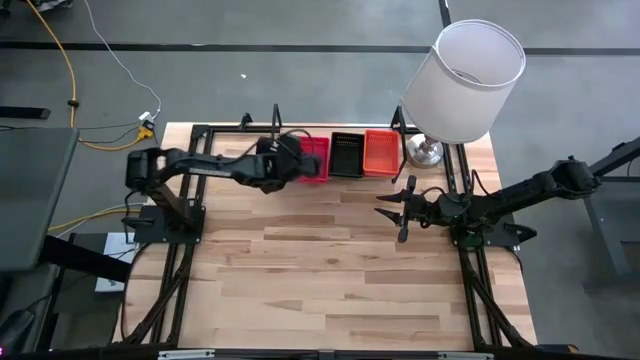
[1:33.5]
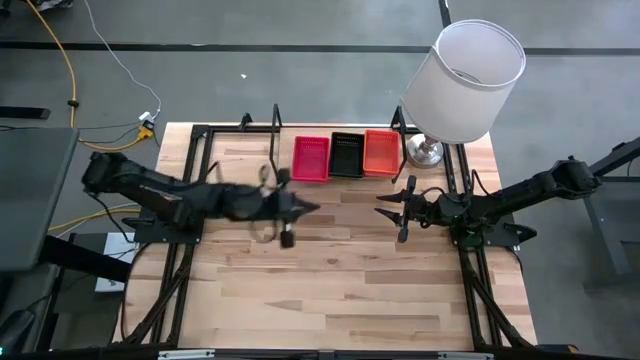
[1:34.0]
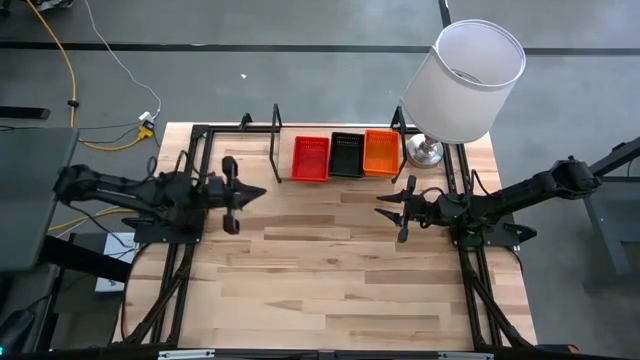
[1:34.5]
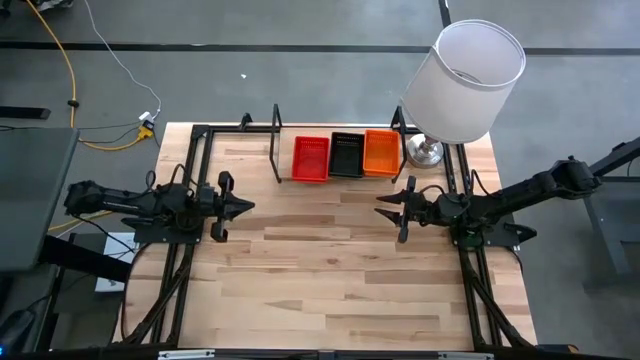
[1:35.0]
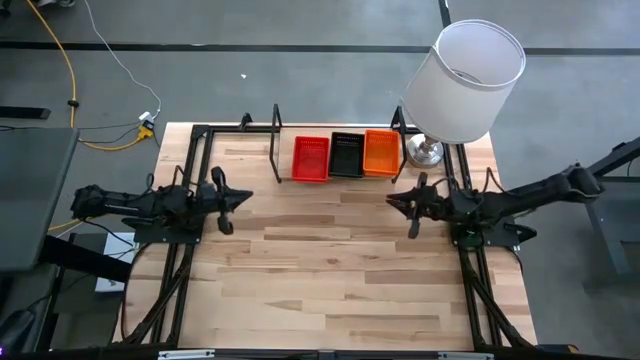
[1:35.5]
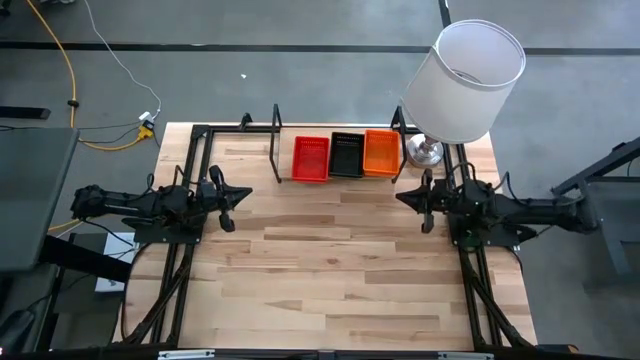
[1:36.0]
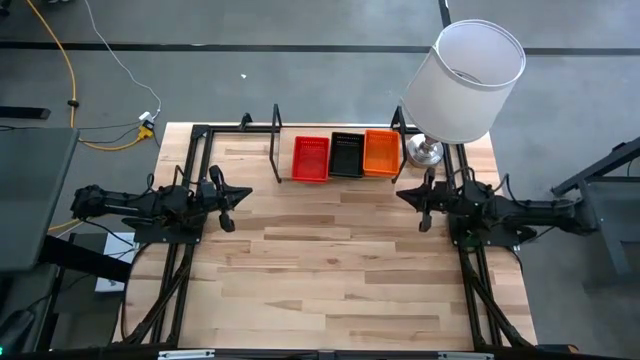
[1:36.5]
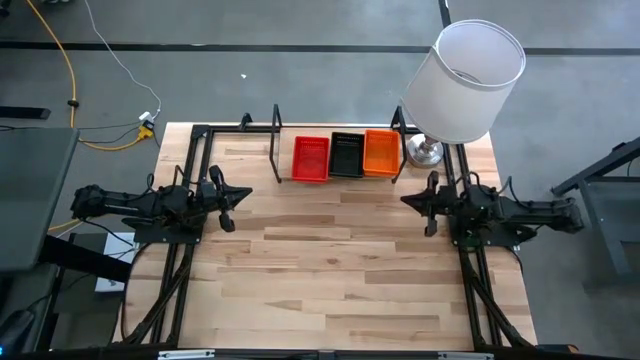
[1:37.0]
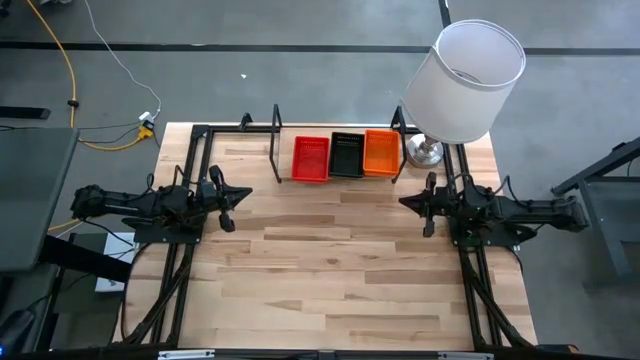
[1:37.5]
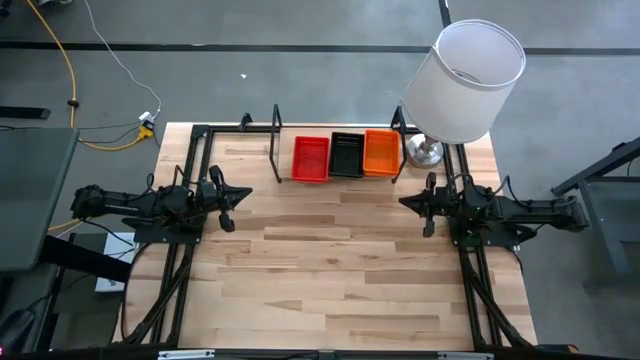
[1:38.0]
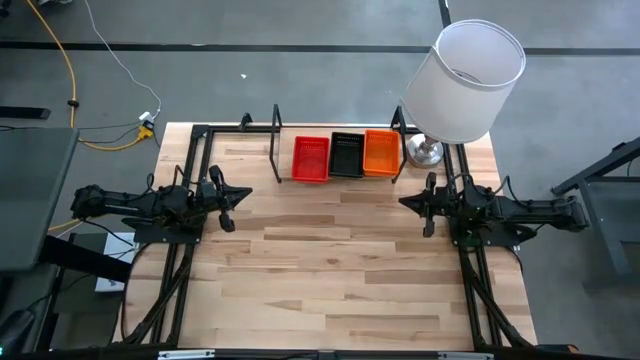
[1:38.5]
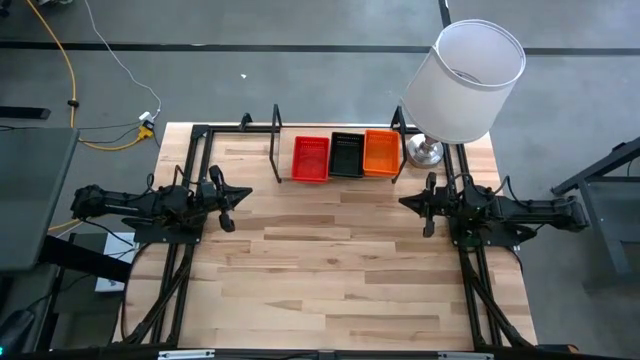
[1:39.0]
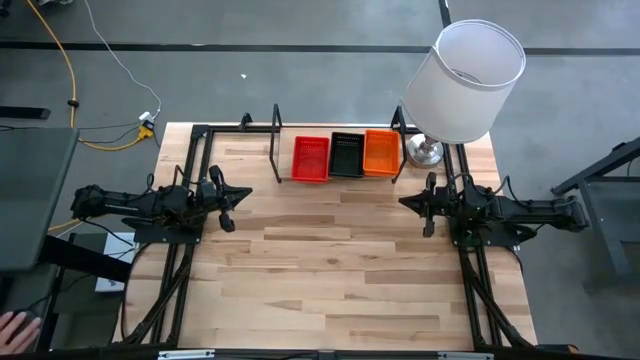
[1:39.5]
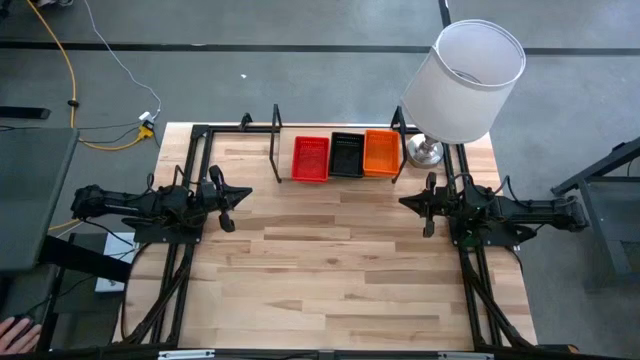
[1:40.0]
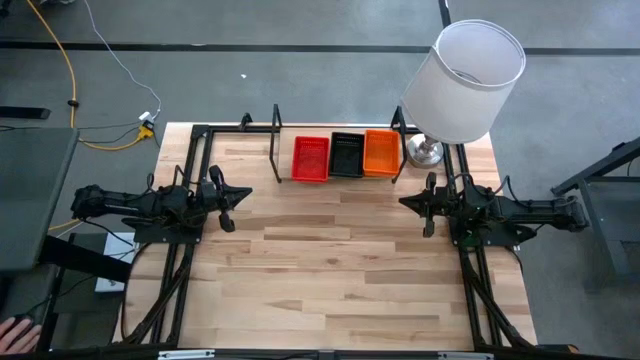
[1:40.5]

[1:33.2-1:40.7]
Task: Stack baskets on shelf by color
Return to Home Position

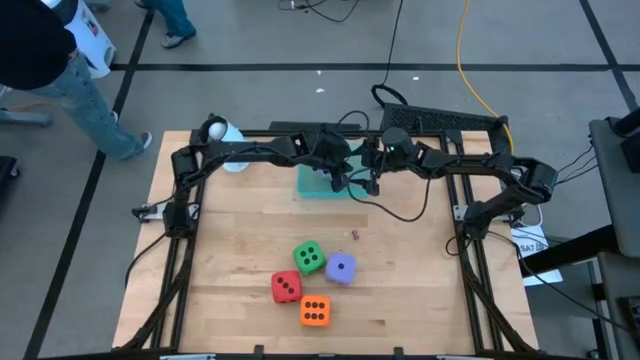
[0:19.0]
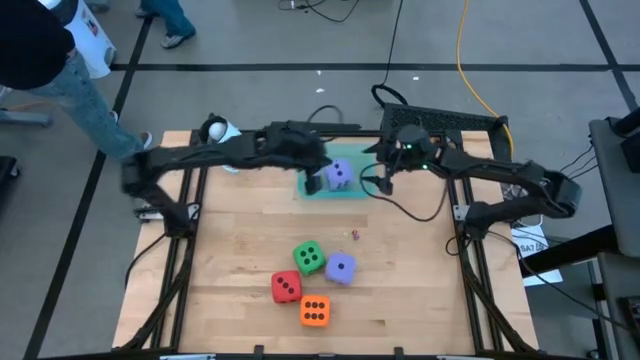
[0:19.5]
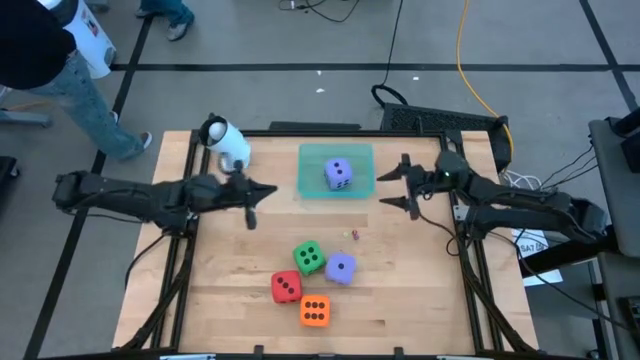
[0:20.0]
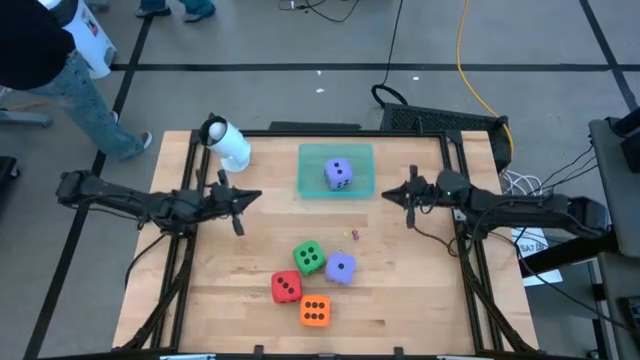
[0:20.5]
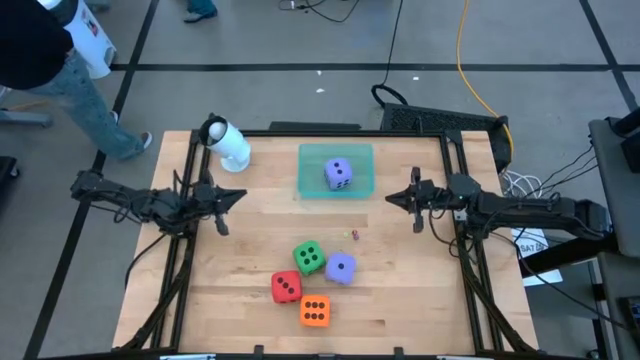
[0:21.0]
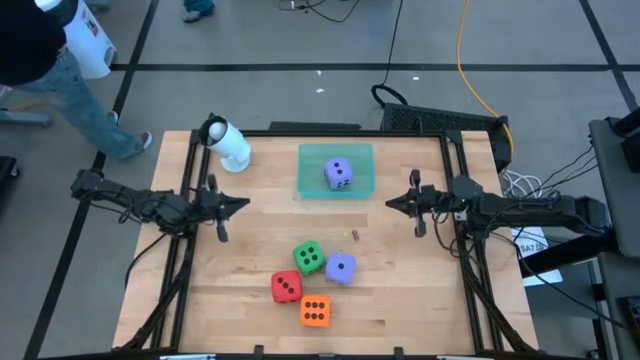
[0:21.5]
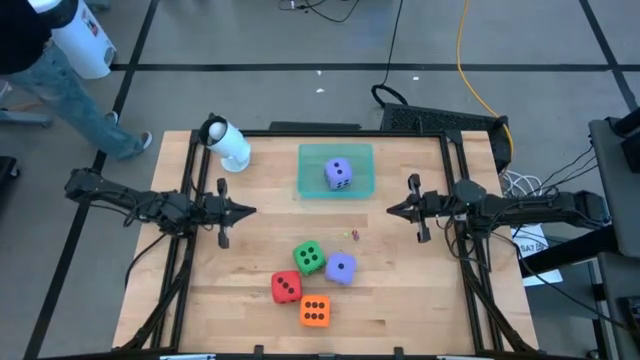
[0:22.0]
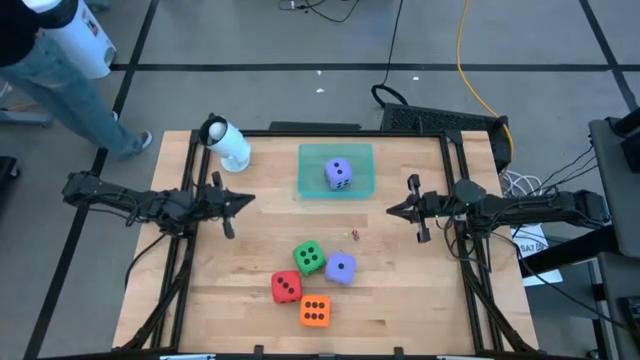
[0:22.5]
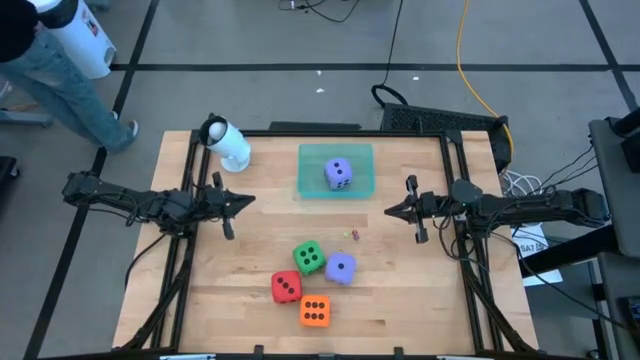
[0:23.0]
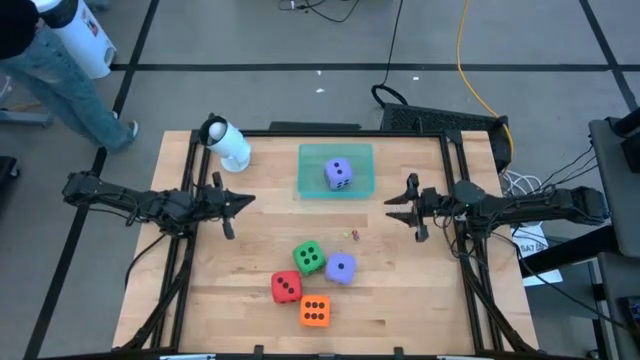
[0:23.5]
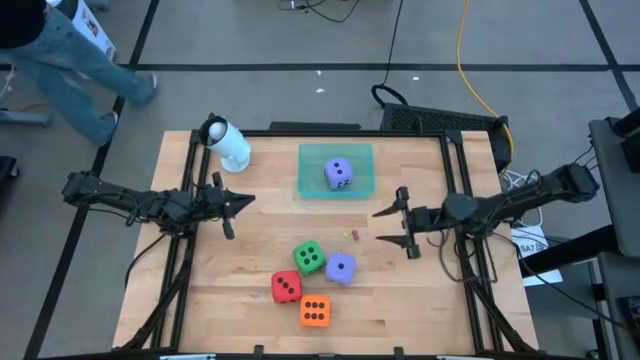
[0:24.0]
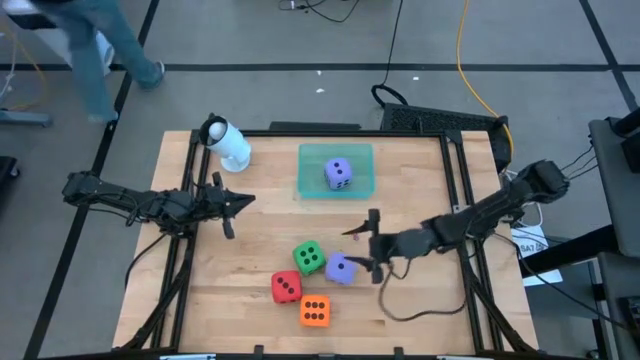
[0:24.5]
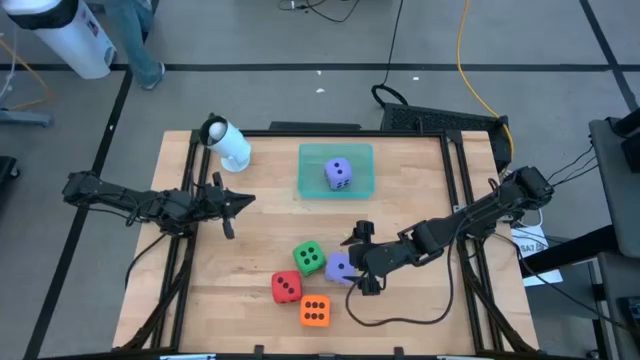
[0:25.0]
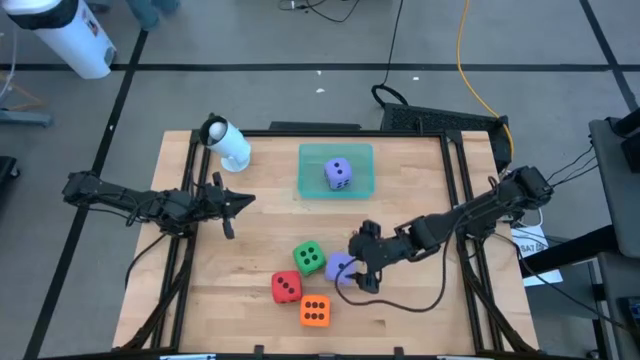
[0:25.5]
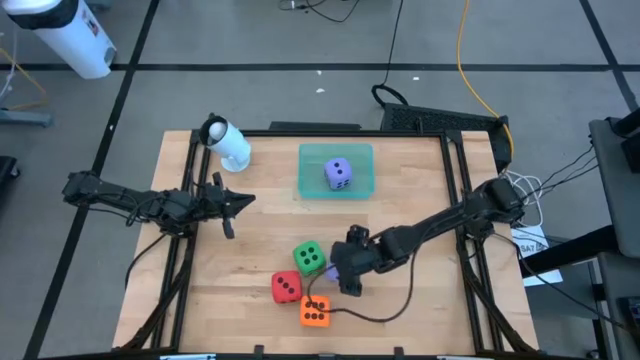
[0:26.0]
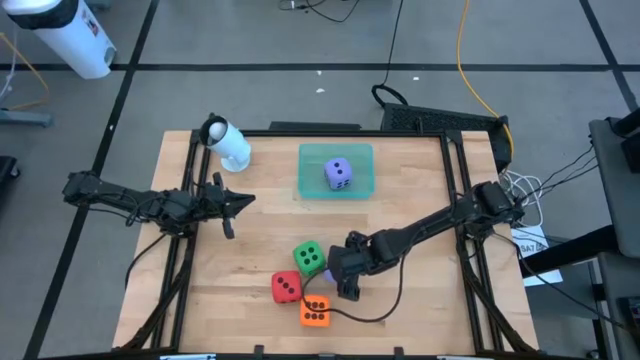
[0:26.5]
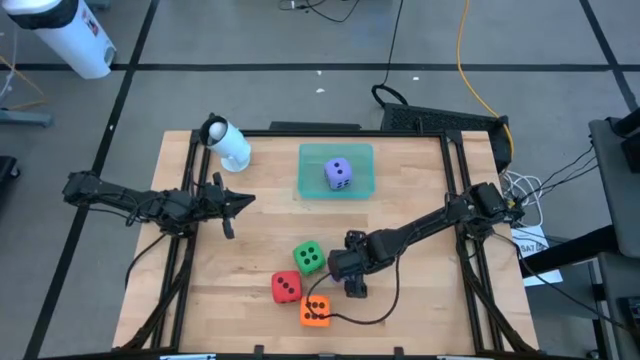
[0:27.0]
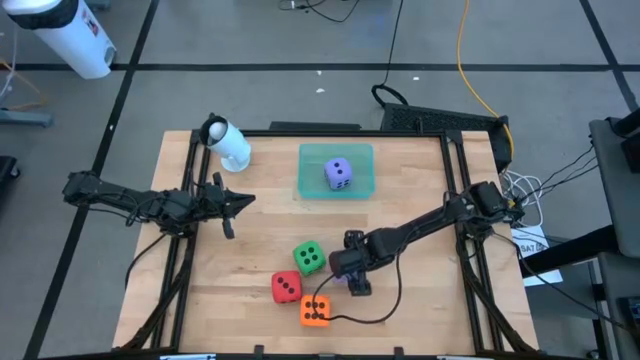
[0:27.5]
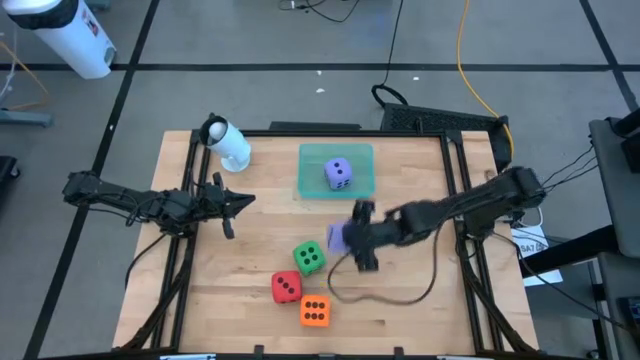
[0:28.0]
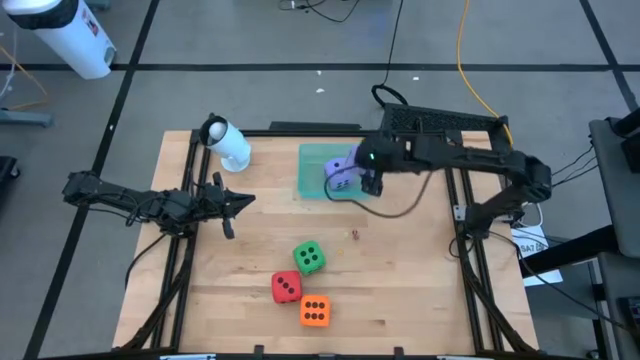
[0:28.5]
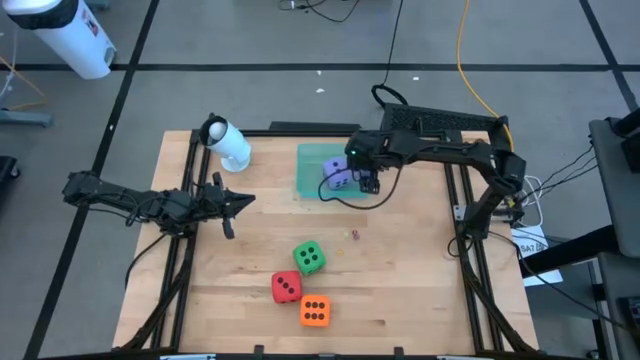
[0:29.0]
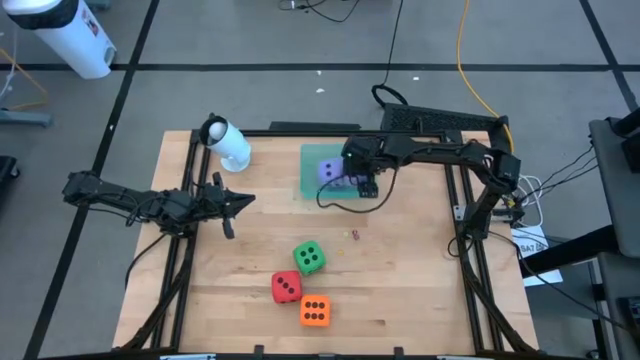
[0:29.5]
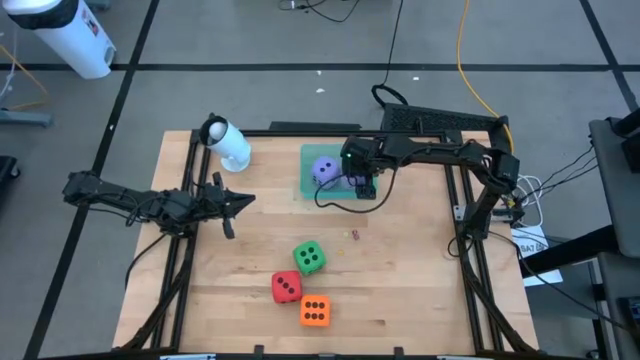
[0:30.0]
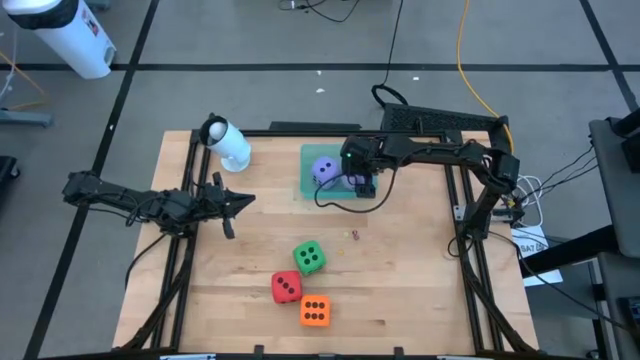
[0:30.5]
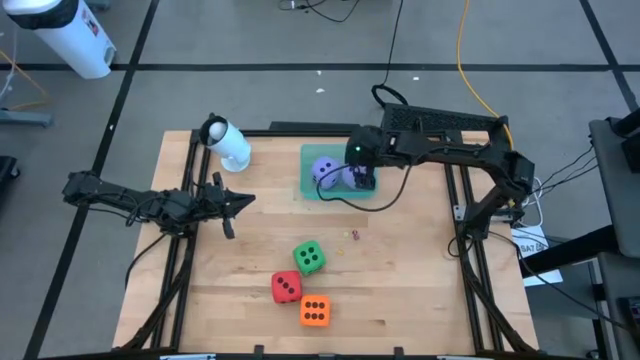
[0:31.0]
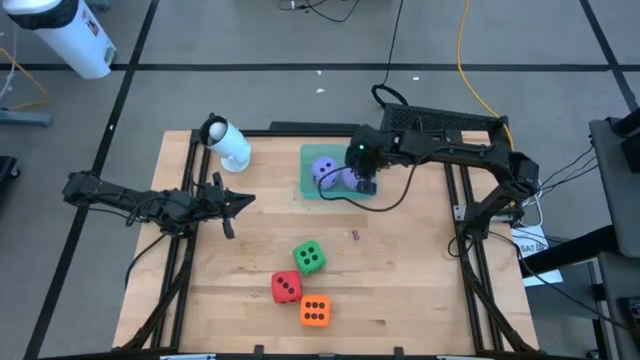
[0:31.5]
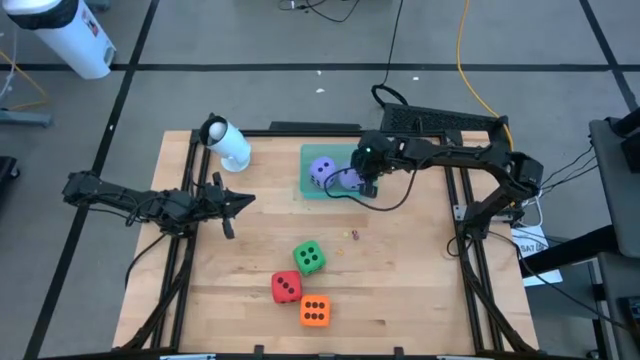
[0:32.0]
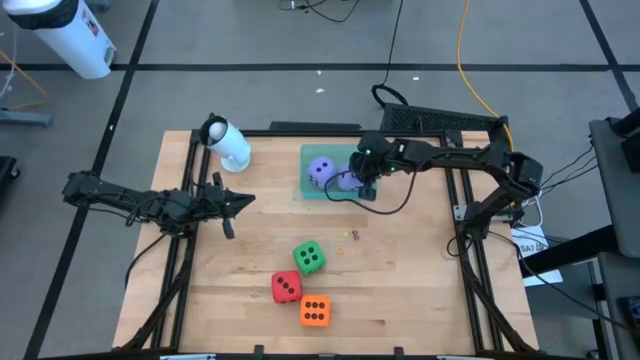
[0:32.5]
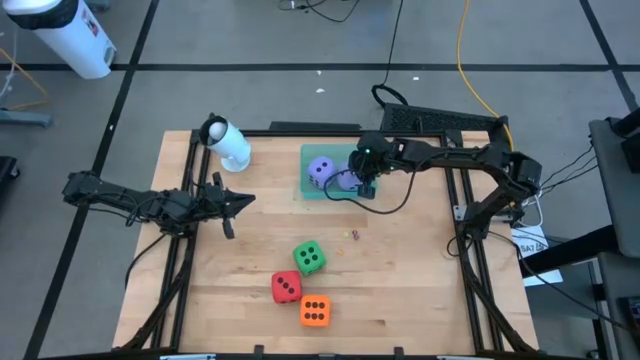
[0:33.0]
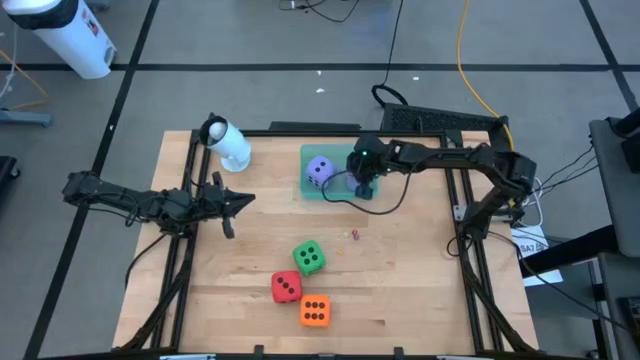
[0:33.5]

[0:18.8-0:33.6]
Task: Pick & Place Dice
Put the big purple dice into the green bin
